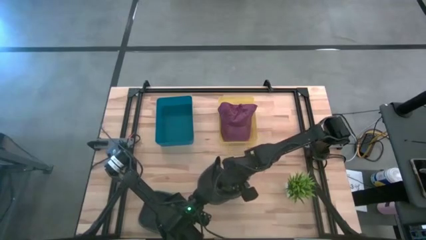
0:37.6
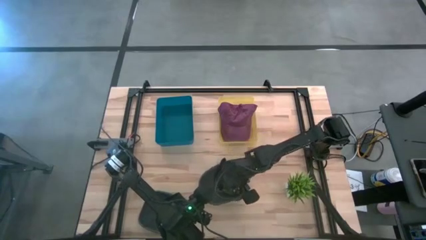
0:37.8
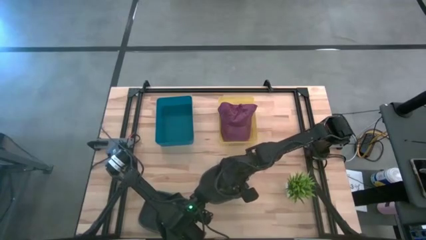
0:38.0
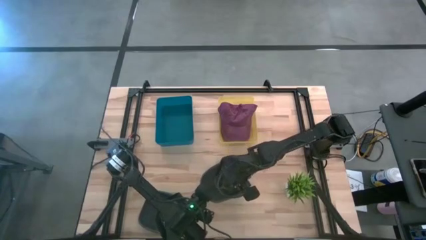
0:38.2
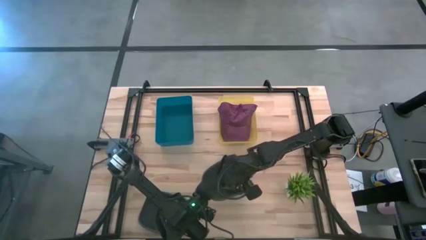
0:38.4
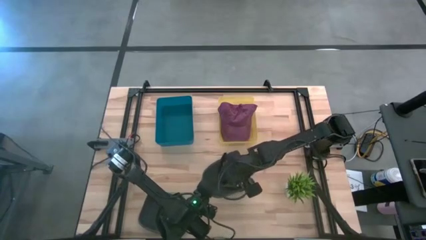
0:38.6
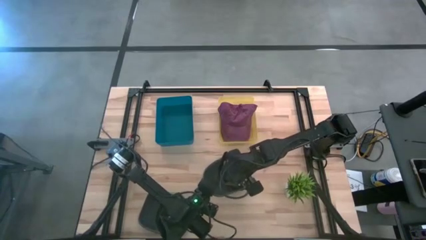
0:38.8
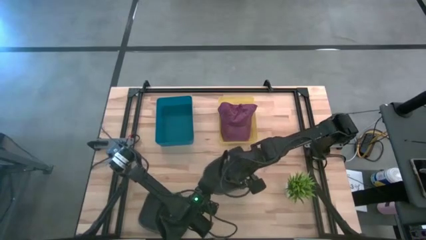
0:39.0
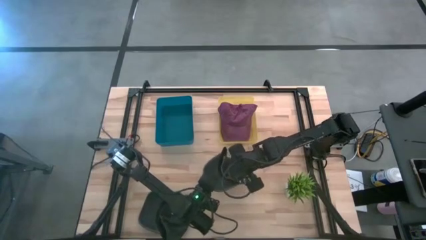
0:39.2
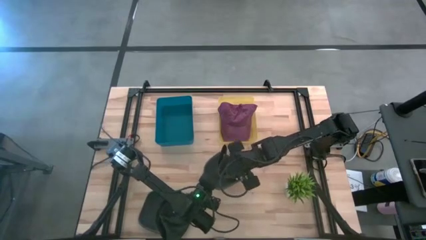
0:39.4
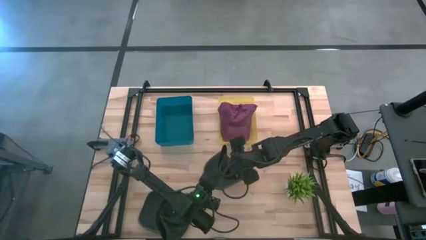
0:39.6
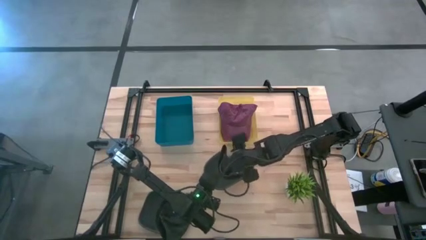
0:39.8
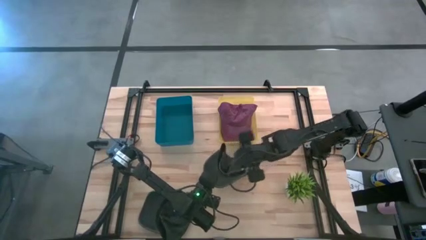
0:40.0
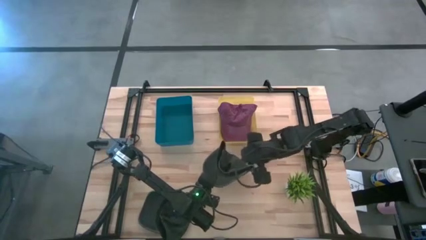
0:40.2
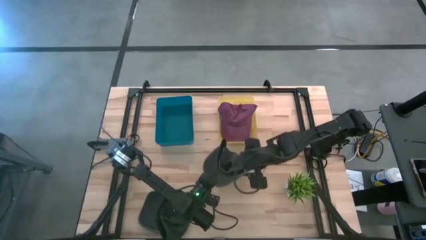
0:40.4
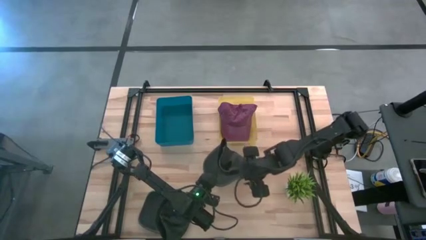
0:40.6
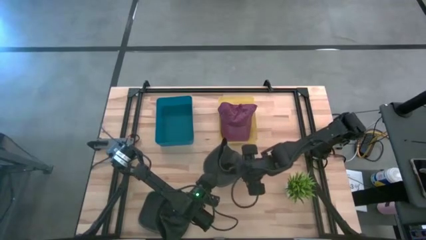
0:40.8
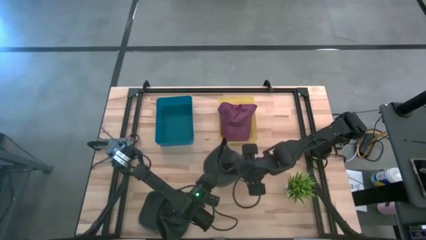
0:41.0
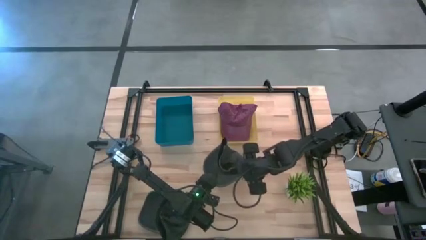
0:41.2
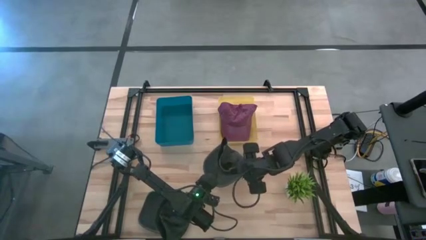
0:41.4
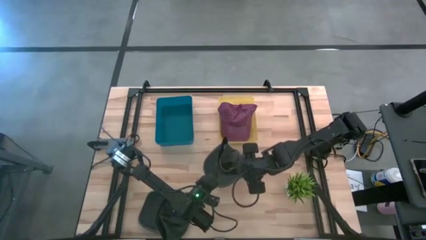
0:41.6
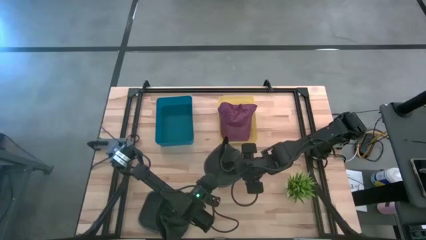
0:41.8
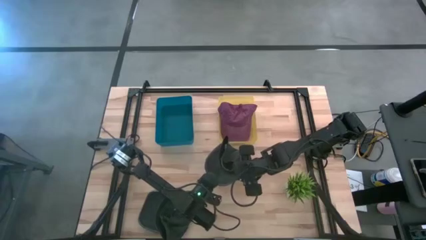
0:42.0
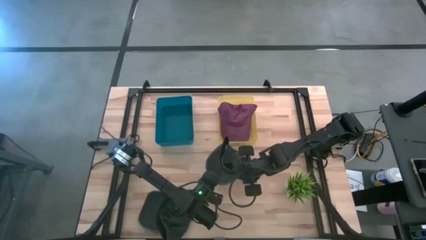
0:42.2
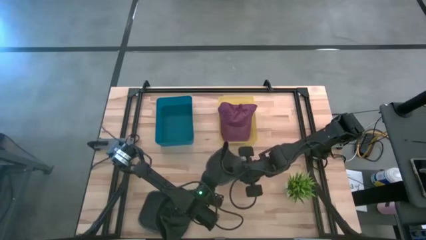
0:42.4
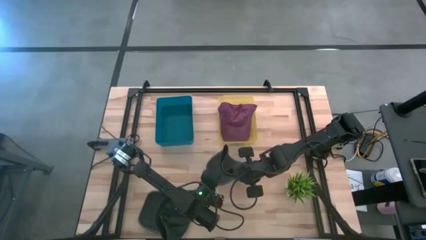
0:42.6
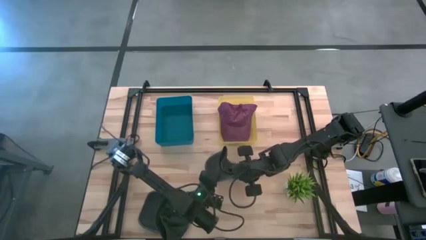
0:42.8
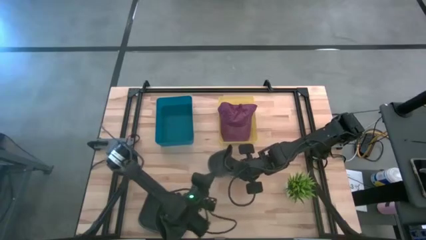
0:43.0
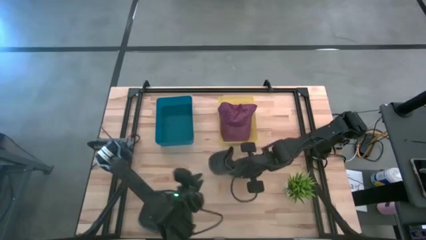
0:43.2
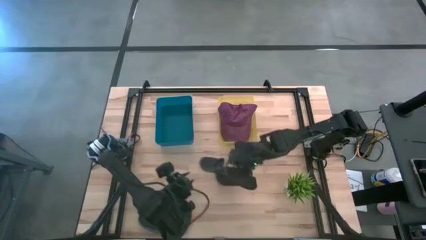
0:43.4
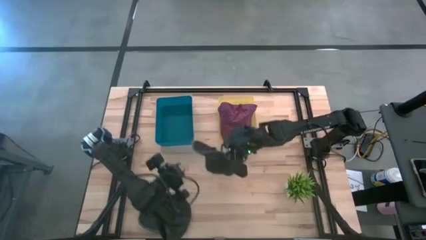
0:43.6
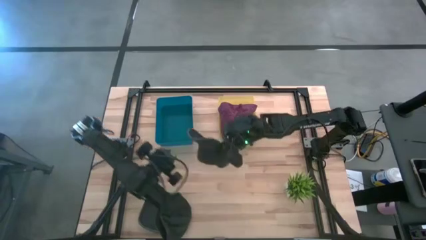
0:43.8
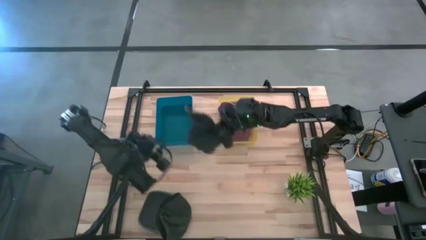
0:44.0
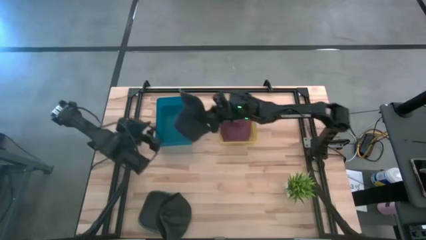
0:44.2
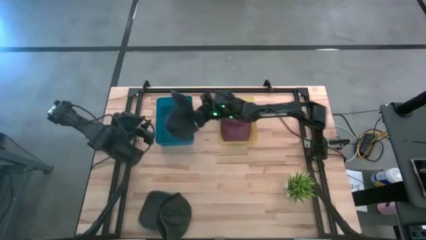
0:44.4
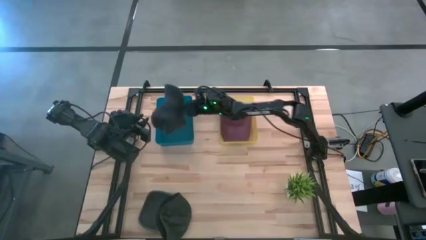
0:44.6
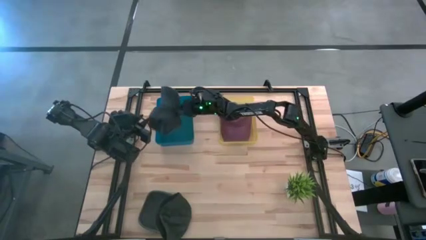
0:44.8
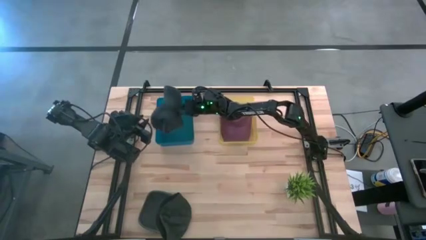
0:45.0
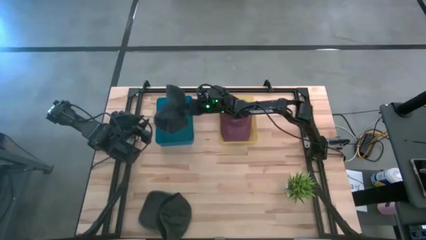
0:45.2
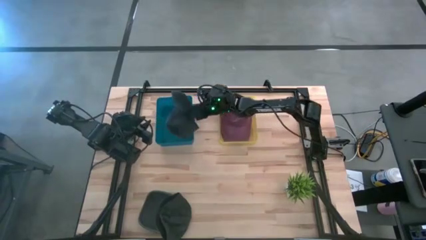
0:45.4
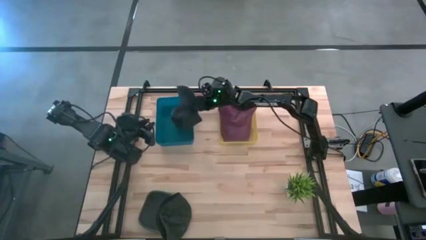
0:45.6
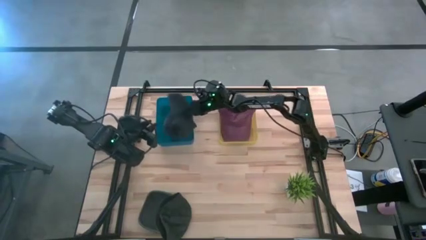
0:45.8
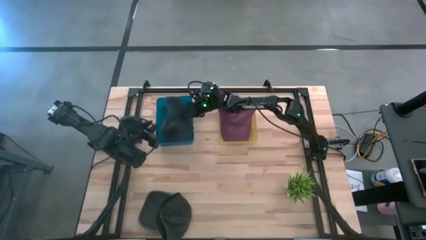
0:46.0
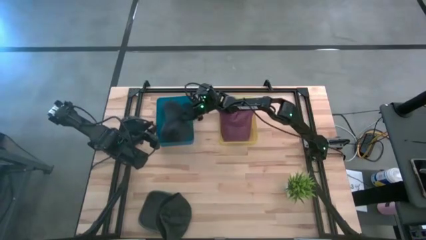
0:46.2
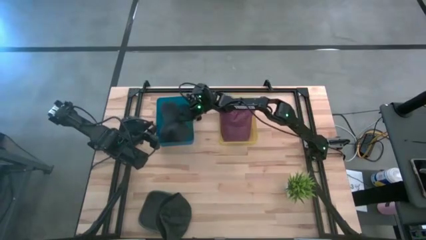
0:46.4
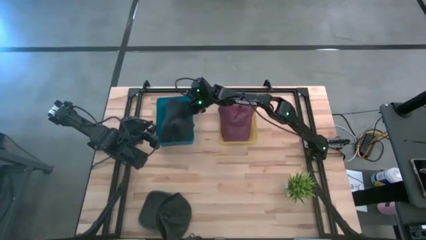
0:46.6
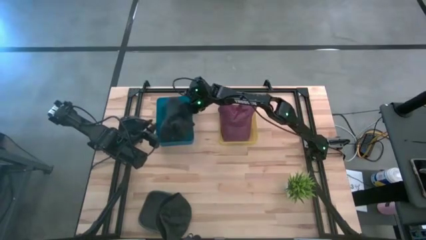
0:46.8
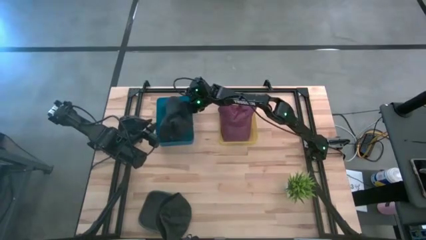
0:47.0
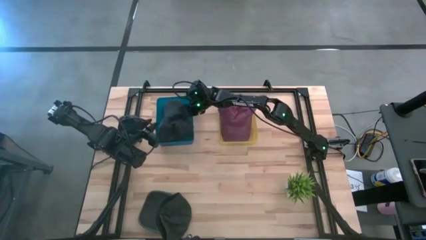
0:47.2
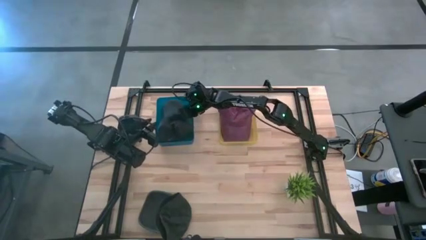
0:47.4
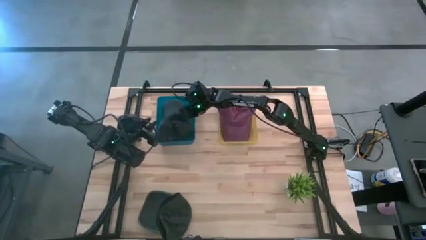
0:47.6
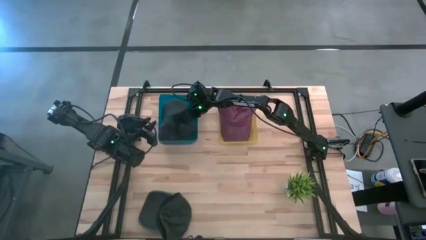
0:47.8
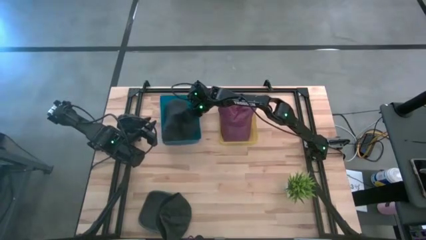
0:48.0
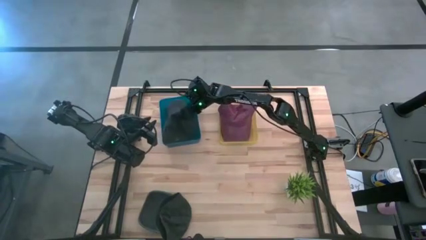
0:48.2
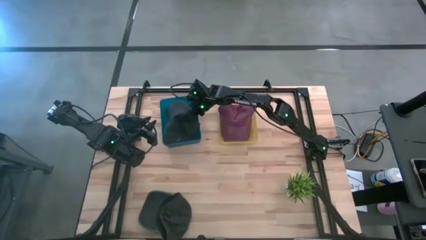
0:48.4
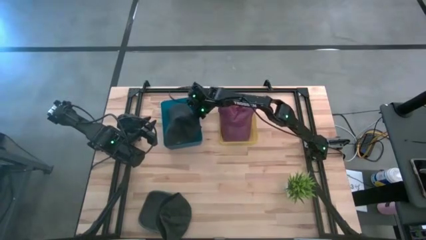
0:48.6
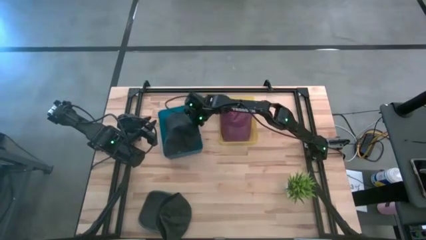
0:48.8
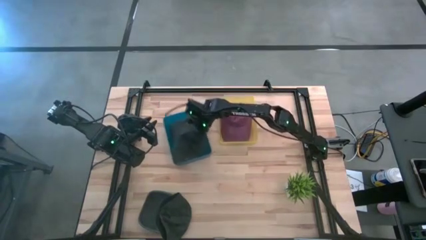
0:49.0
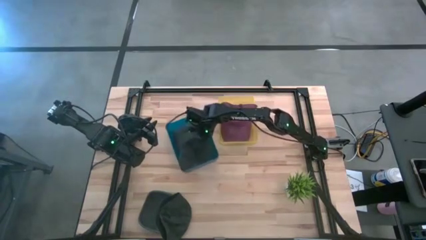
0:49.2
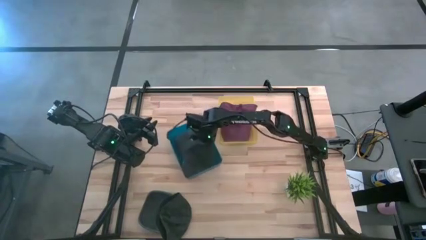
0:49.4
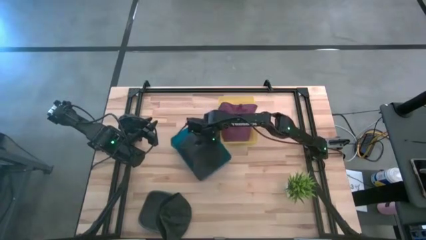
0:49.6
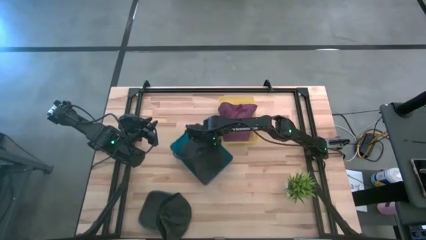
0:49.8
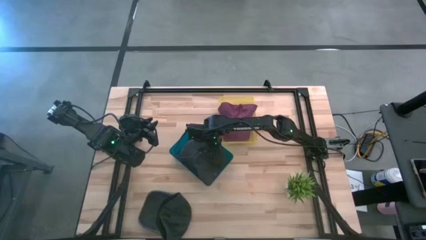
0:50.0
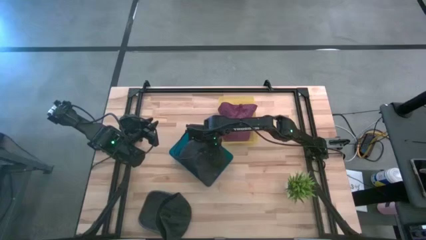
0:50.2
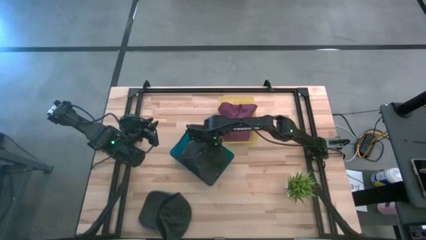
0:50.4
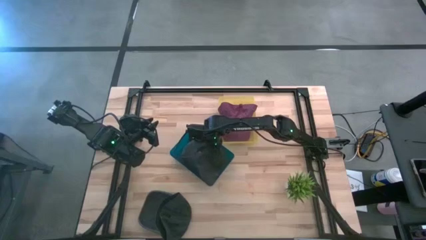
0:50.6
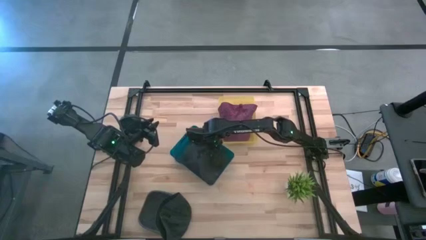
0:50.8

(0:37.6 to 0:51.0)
Task: Pick & Place hat
Put the top black cap into the blue bin

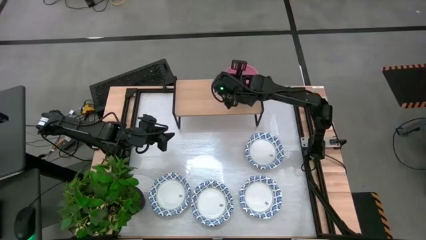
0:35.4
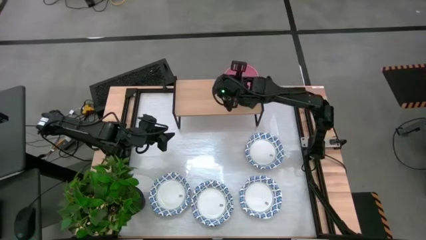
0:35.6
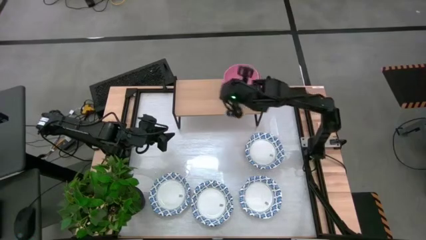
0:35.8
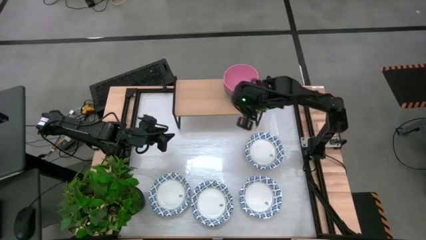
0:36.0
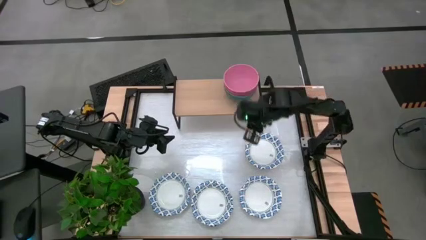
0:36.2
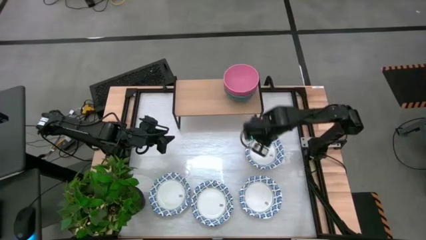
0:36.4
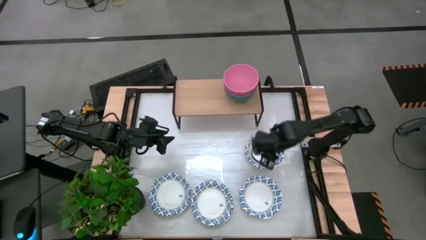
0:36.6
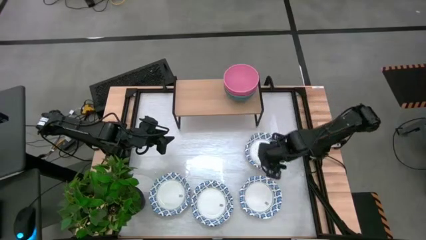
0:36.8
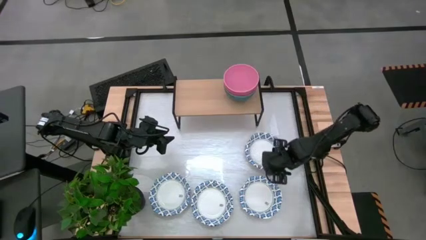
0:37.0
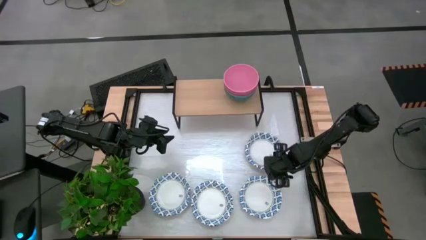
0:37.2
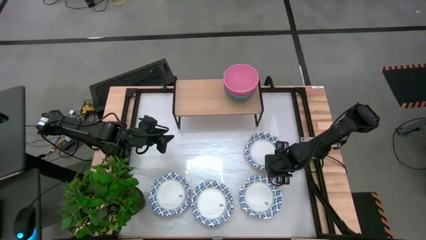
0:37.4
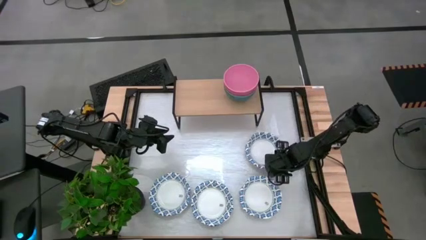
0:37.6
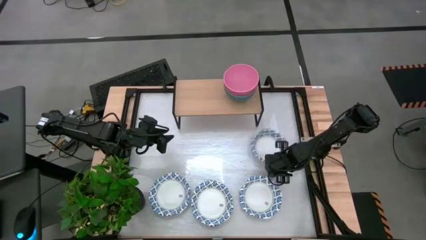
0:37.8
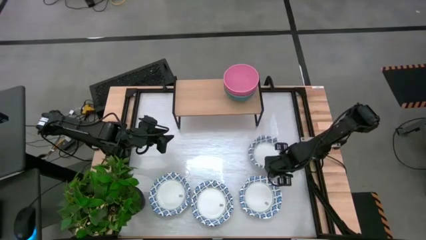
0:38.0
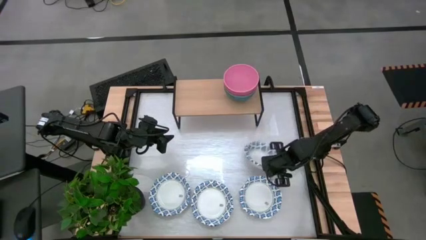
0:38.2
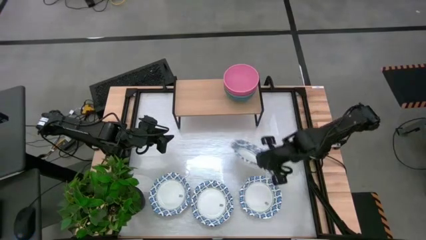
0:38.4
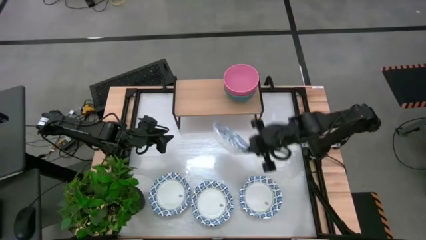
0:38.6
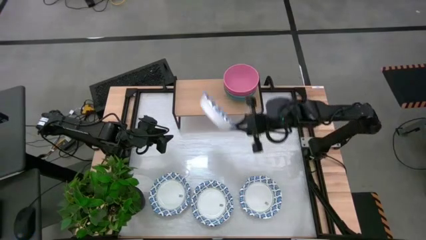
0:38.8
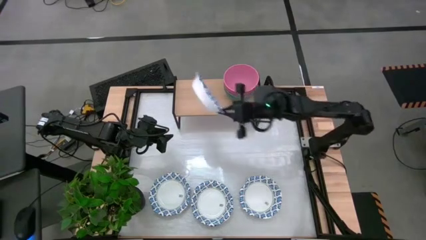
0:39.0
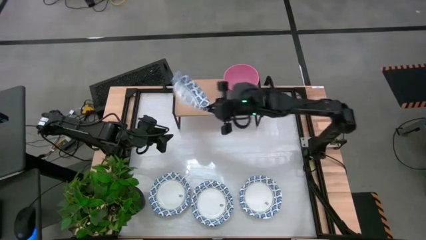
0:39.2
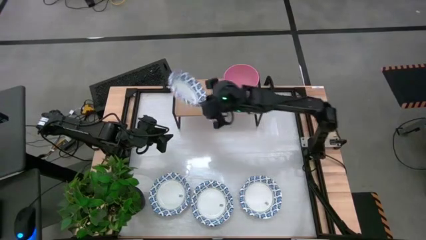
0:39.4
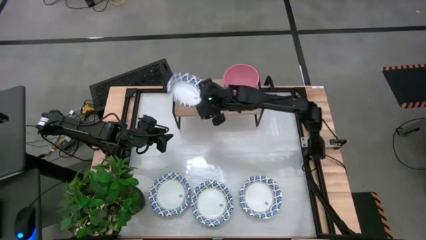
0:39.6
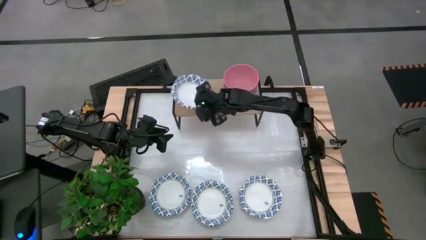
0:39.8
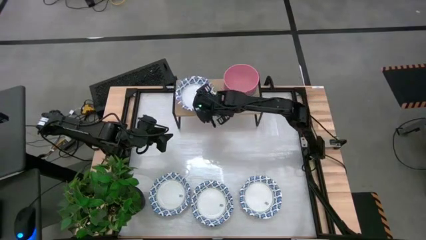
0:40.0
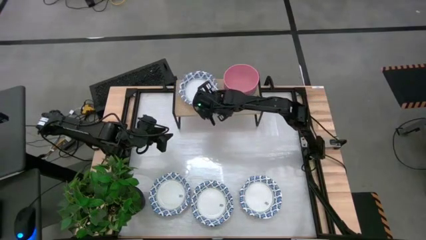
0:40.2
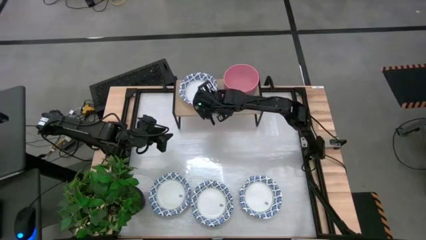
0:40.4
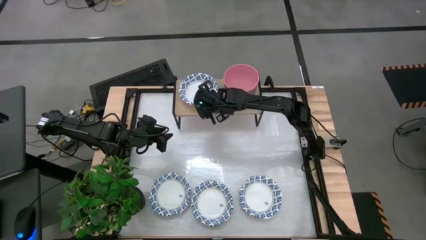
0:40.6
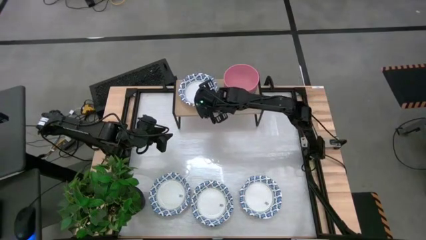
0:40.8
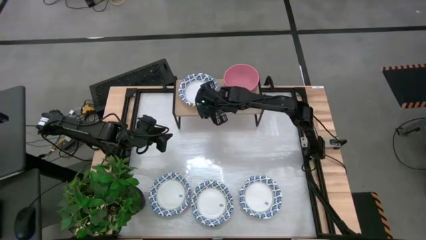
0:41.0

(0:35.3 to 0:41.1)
Task: Place and stack bowls onto a shelf
Put the blue patterned bowl on the shelf
